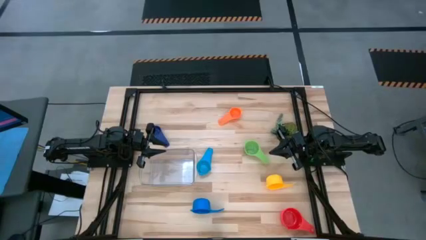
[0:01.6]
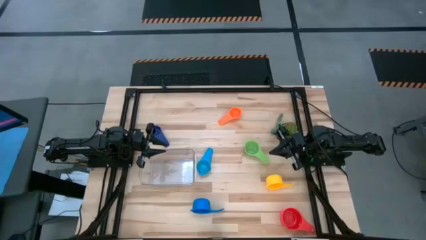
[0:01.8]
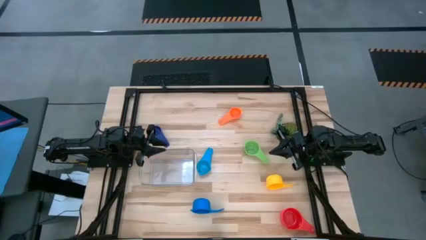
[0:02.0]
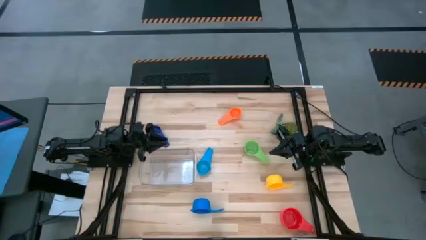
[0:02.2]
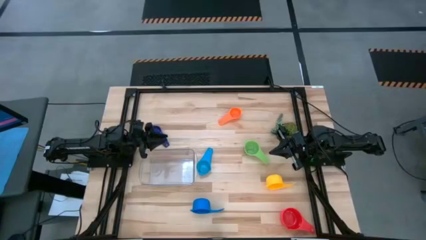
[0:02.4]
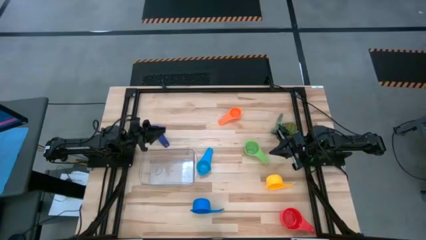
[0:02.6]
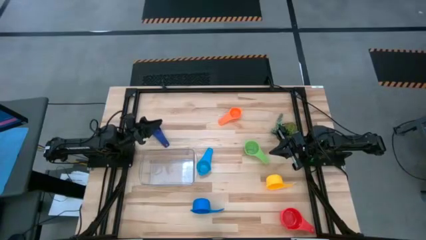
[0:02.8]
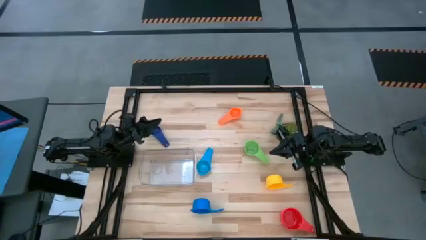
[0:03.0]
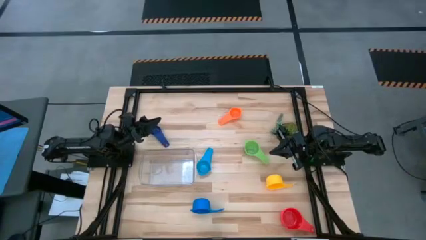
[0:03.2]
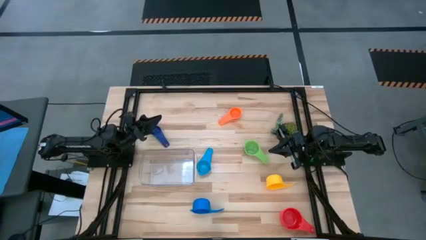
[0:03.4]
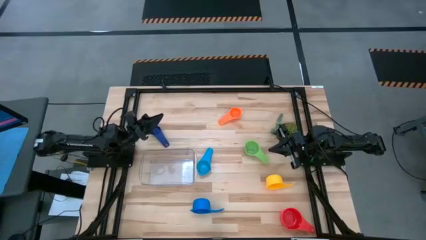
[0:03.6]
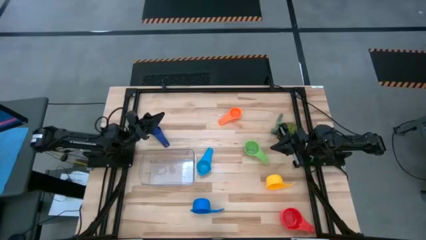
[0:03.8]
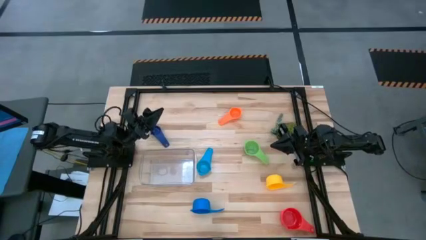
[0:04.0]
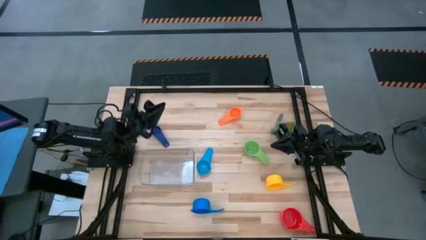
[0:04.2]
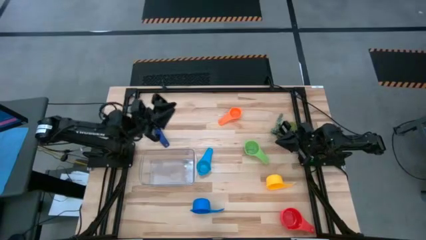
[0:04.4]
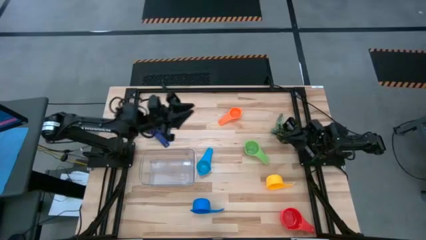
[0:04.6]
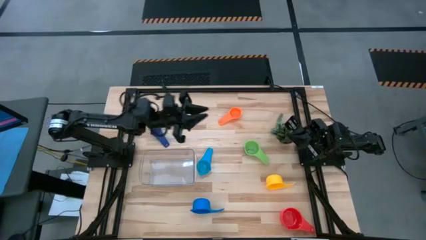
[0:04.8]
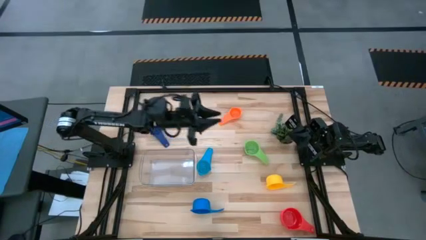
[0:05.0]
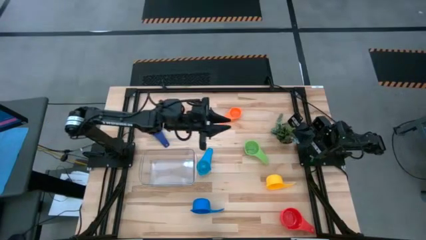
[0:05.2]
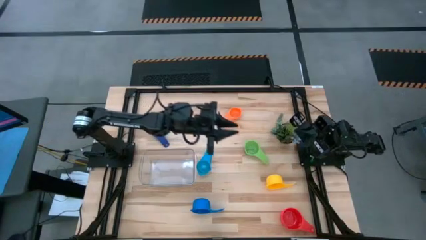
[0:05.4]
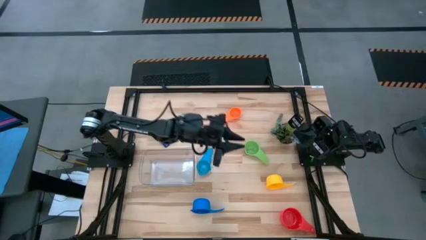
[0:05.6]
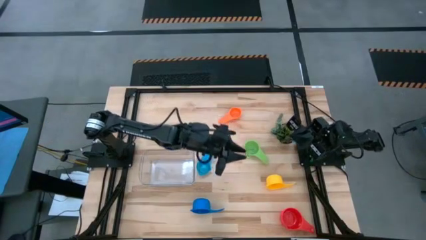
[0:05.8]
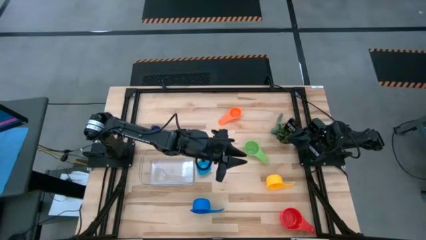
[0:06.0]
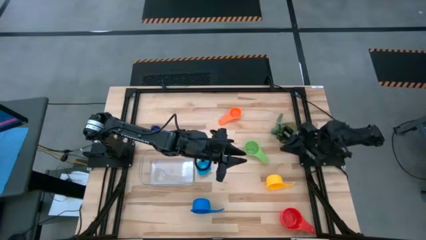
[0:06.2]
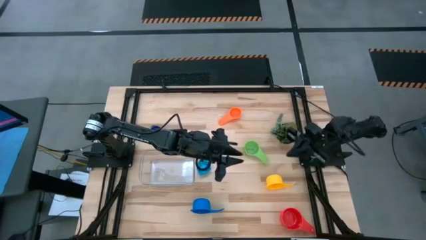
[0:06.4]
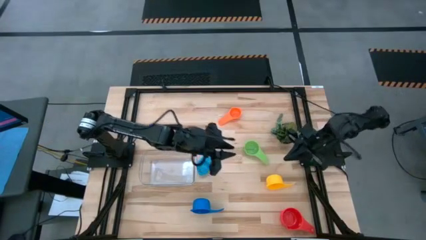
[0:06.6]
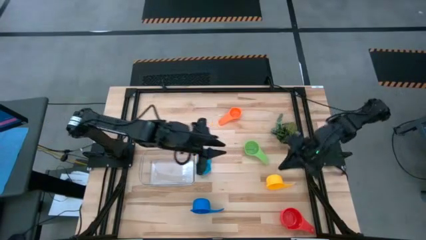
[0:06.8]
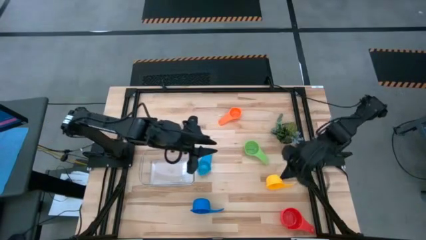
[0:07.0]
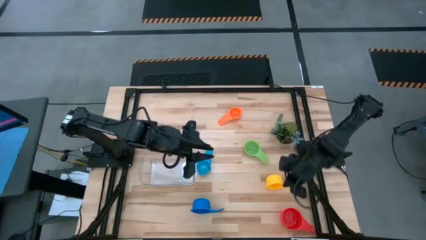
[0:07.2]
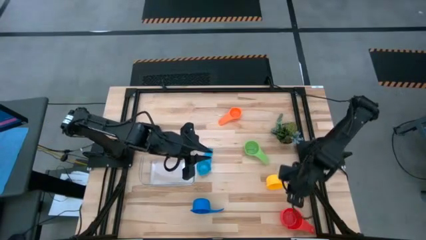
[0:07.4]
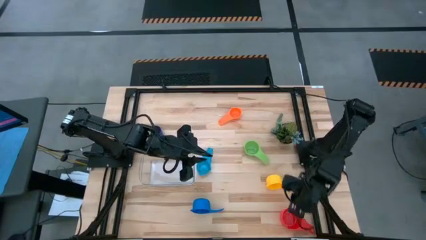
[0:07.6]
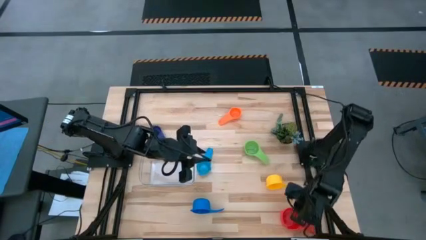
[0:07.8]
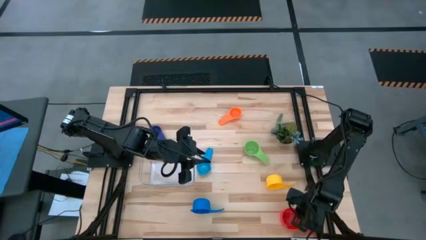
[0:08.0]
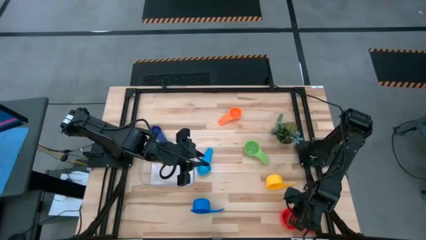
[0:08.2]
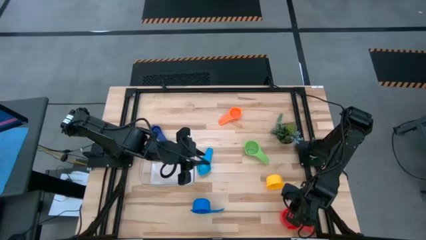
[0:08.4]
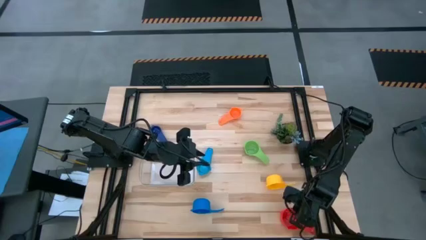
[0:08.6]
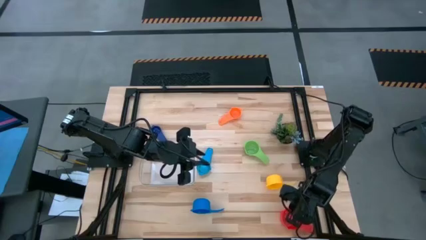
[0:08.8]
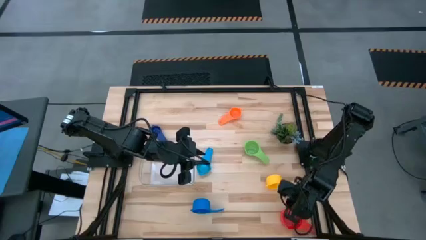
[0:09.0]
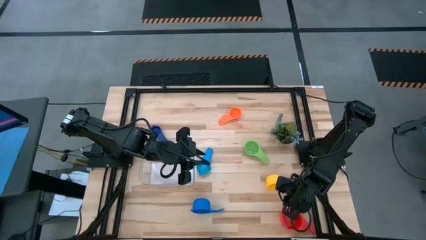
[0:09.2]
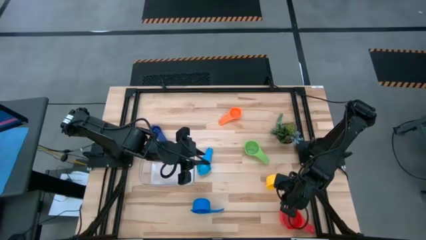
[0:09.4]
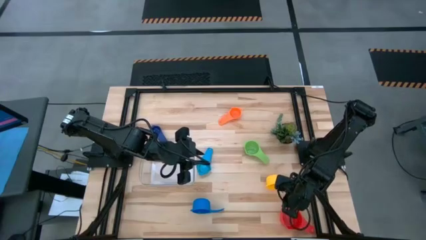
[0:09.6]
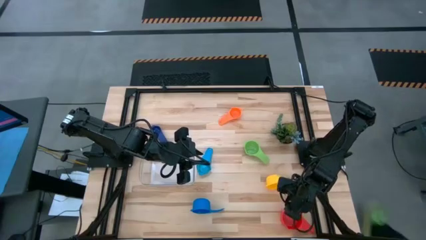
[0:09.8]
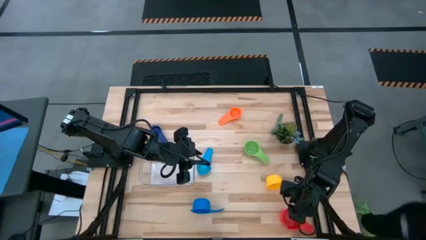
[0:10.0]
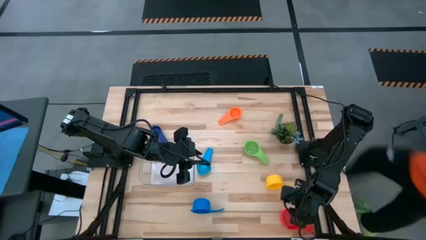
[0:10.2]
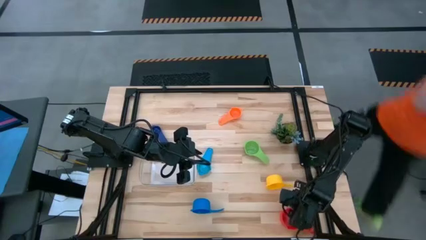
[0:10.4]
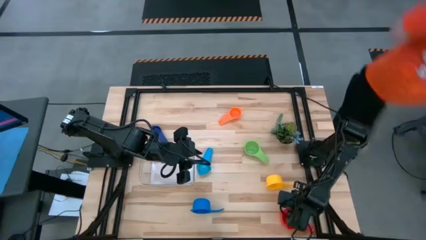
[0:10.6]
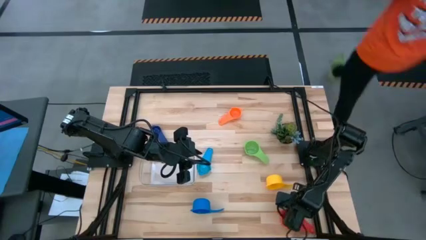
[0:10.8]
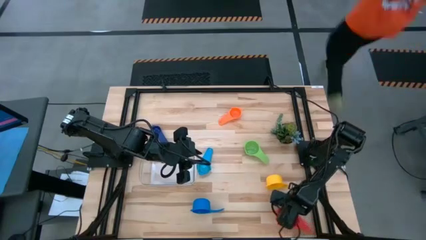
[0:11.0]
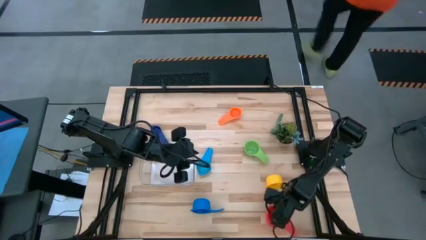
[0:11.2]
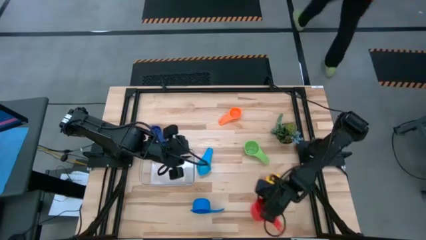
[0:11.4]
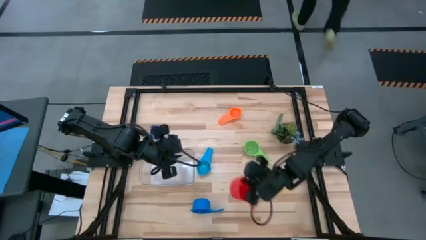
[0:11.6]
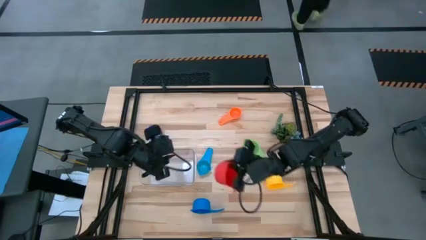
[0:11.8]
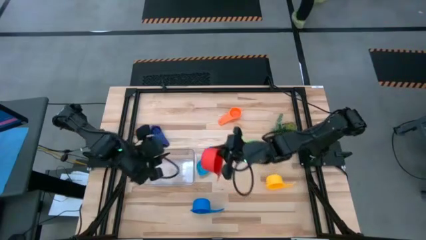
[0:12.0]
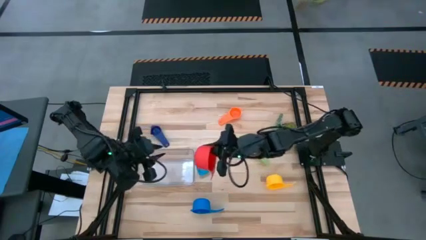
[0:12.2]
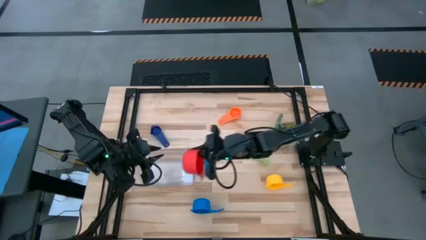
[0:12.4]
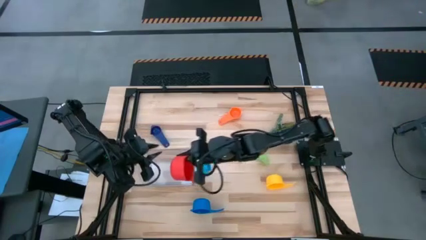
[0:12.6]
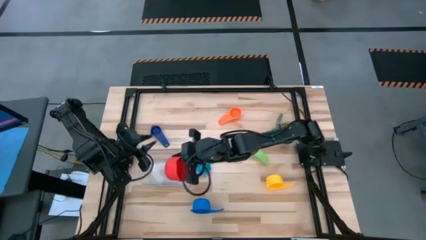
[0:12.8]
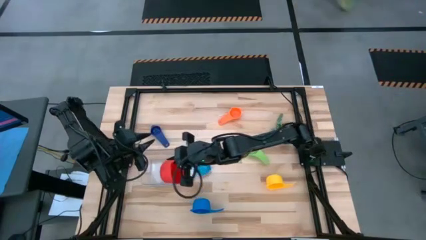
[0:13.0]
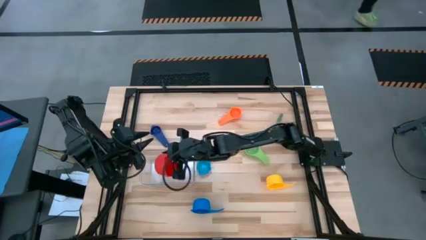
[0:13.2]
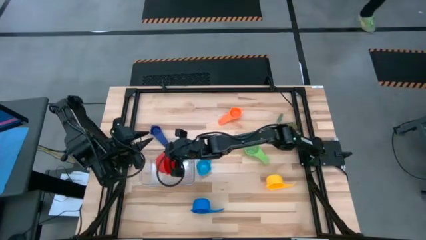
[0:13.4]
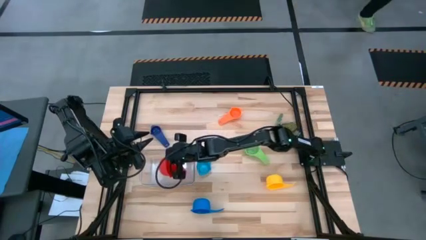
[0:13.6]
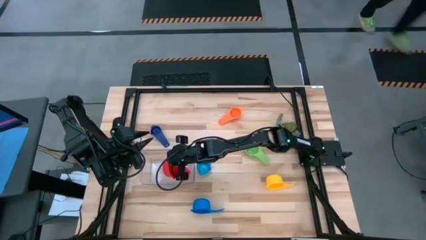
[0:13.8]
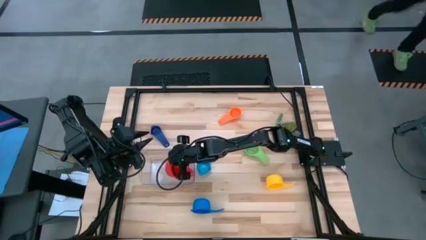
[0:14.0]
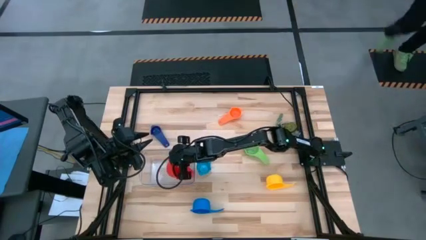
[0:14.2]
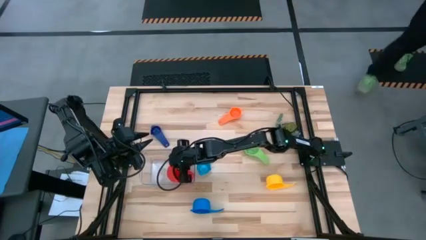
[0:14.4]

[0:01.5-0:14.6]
Task: Nest measuring cups in basket
Put the red measuring cup into the transparent bin
